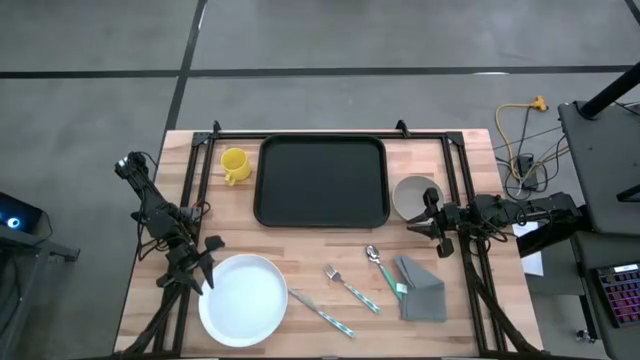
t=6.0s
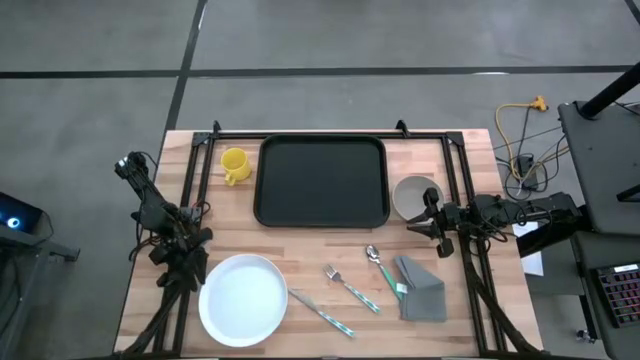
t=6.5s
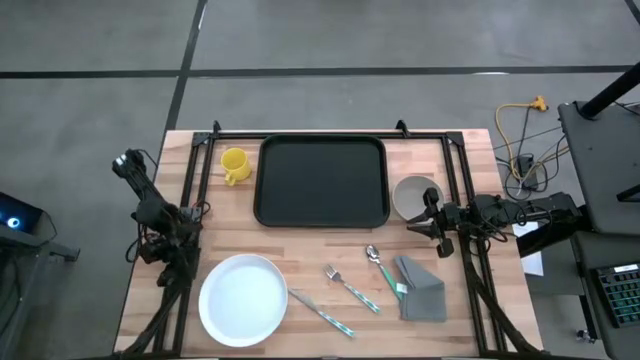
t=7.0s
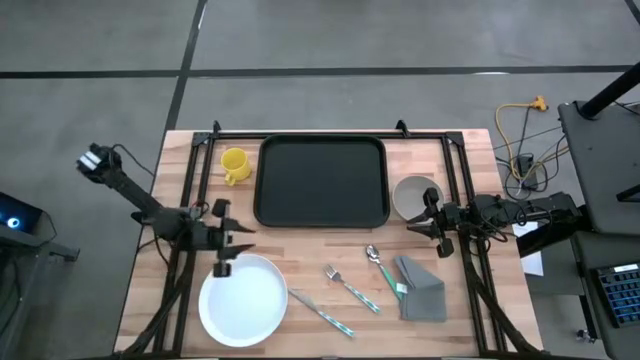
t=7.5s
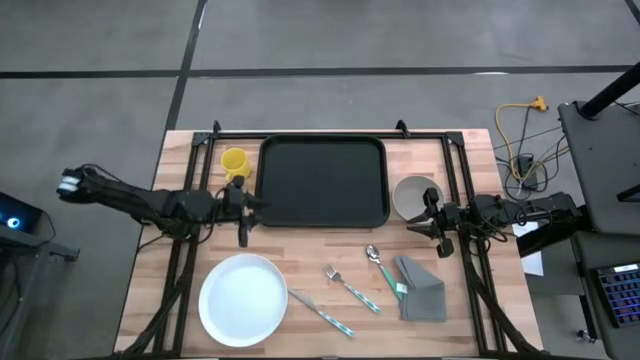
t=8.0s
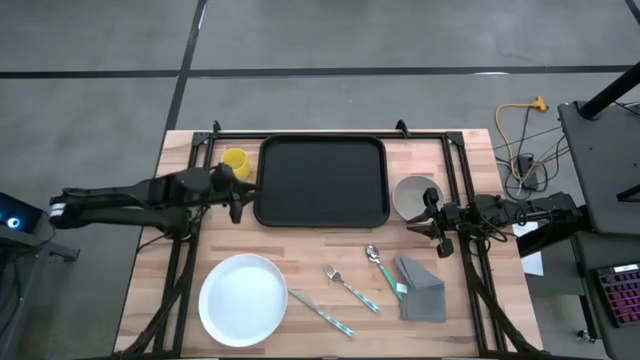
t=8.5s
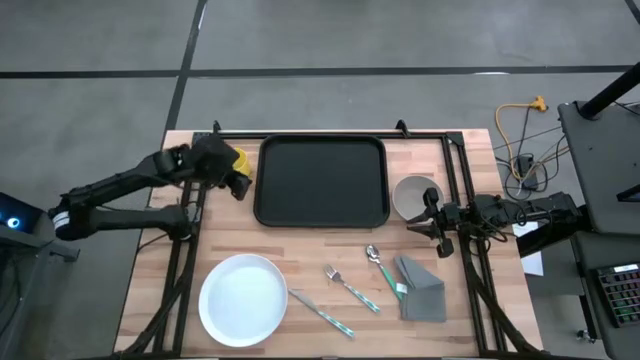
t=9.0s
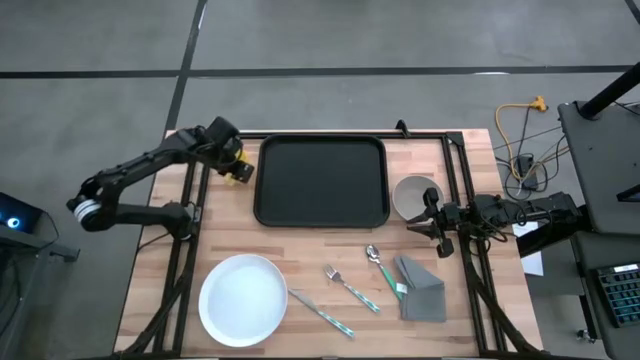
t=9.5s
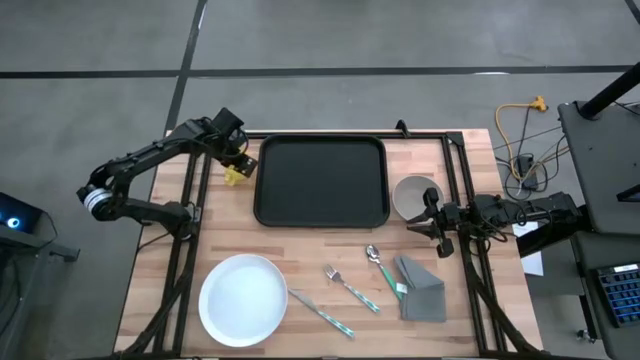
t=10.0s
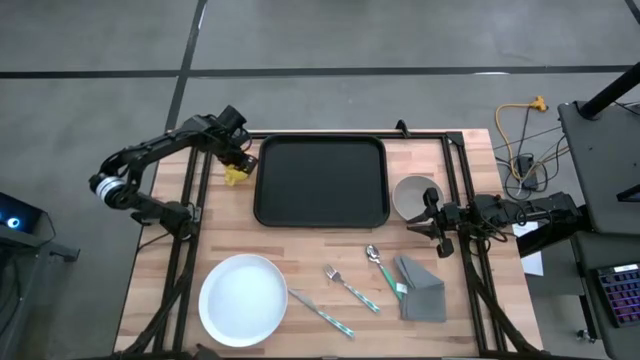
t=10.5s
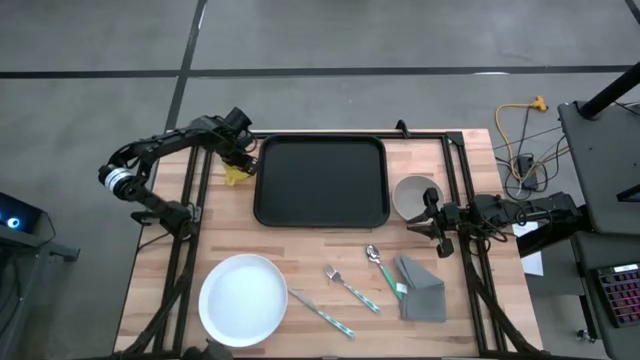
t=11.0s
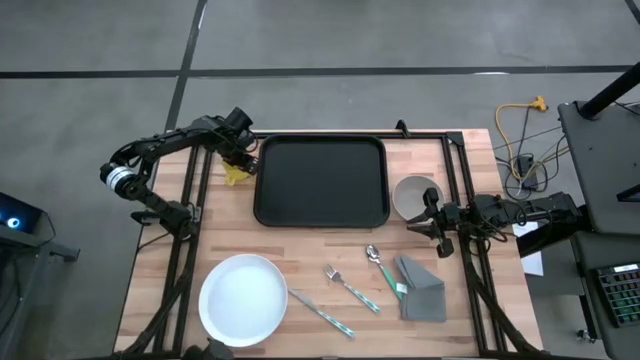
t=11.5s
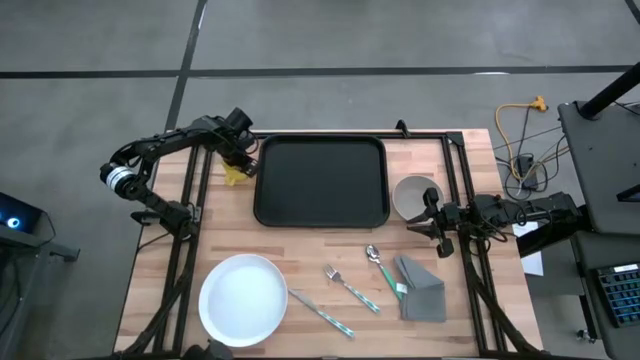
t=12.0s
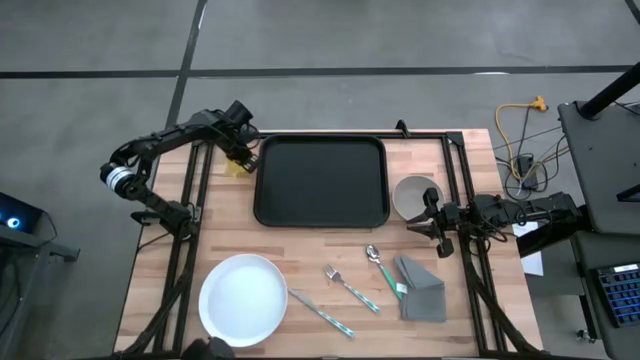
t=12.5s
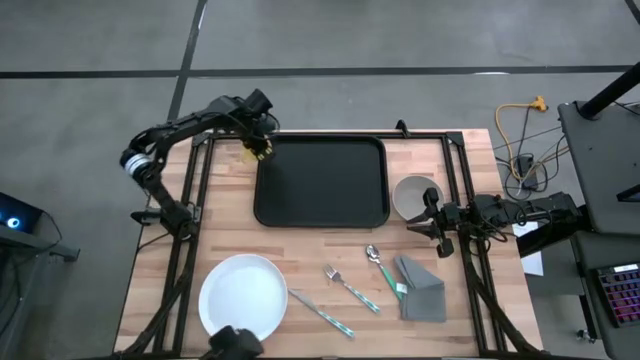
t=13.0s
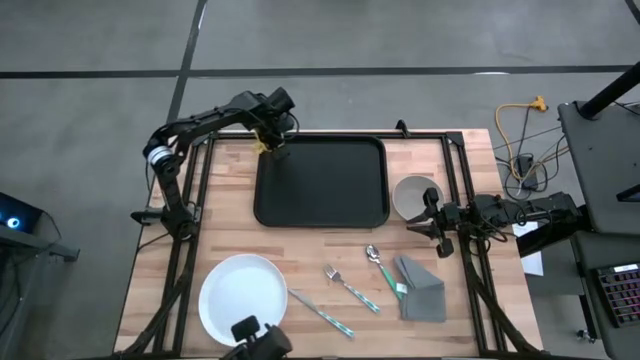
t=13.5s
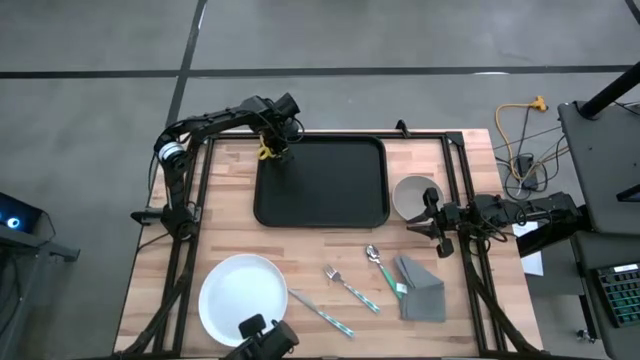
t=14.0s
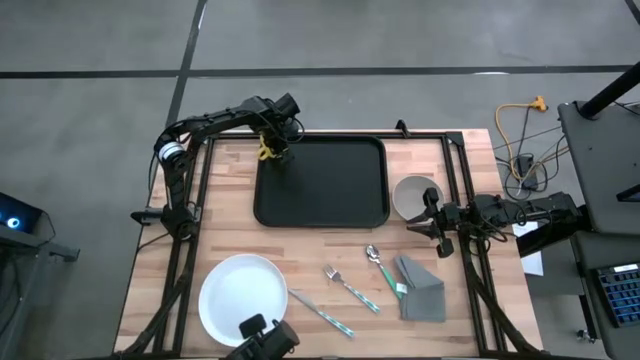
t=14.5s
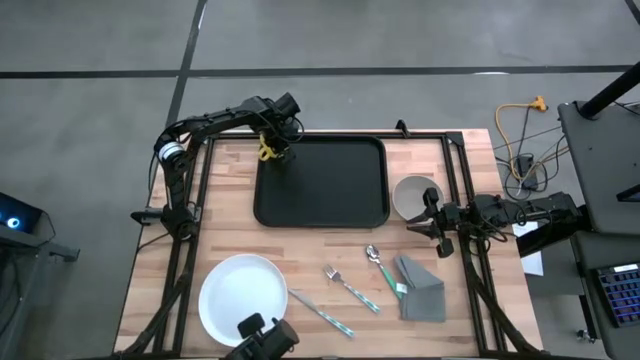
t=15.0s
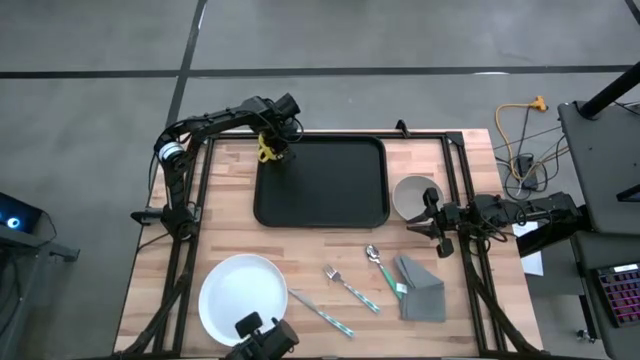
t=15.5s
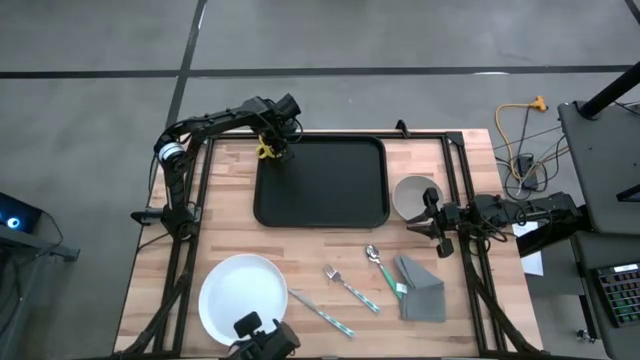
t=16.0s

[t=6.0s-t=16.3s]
Task: Set up tray
Put the yellow cup on the black serving tray

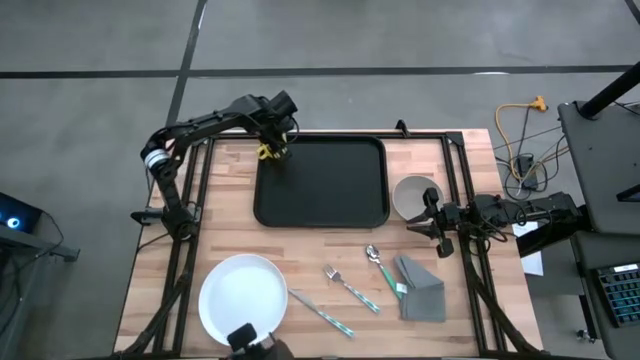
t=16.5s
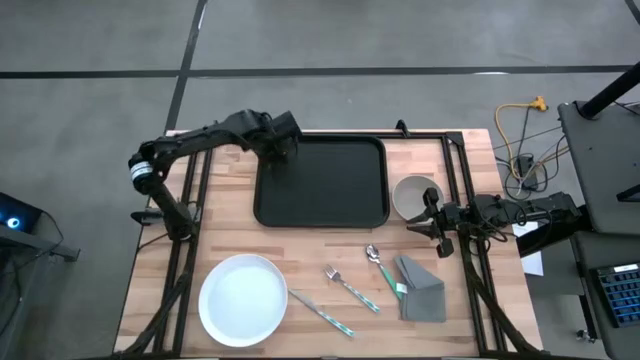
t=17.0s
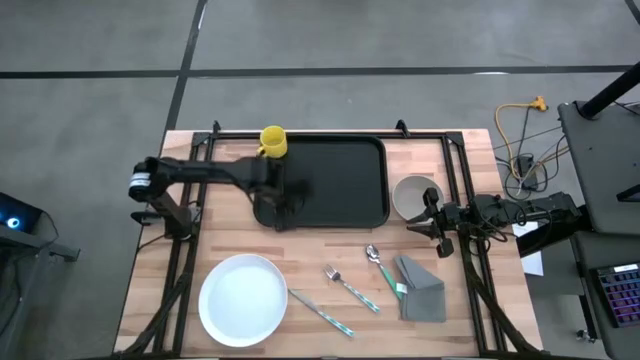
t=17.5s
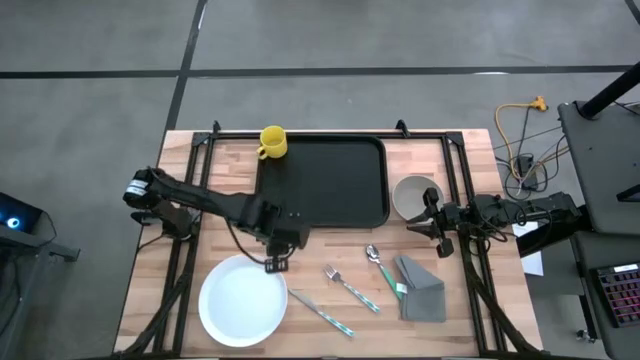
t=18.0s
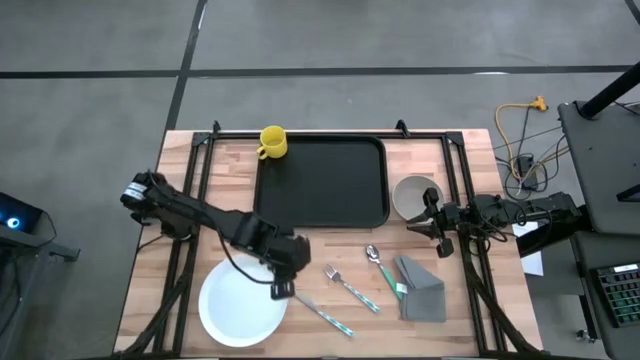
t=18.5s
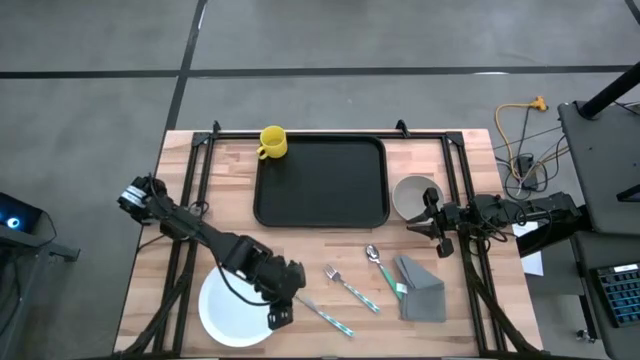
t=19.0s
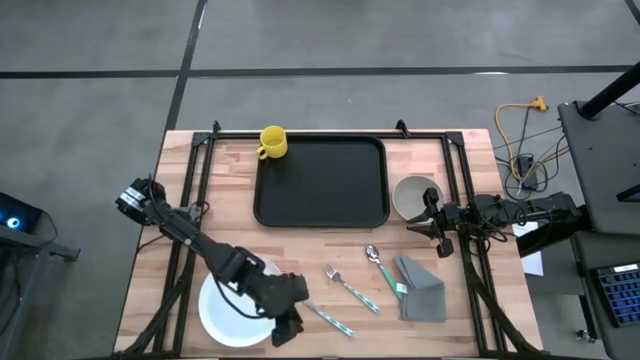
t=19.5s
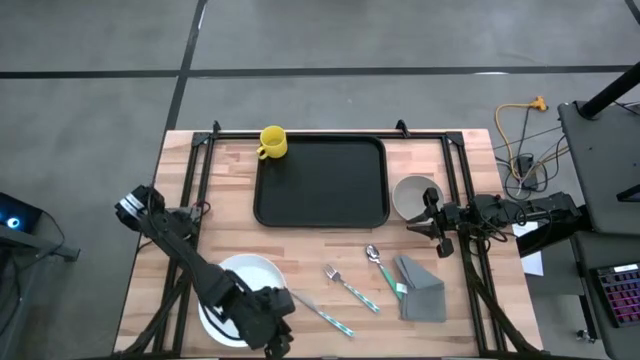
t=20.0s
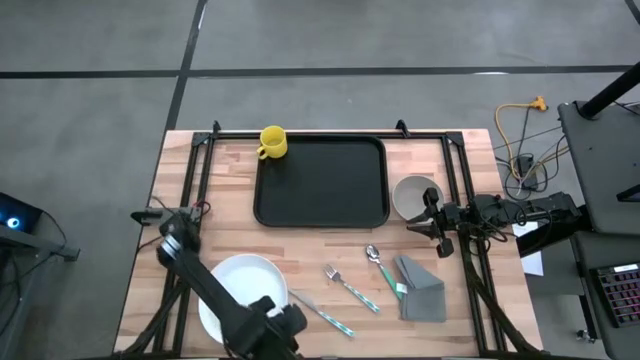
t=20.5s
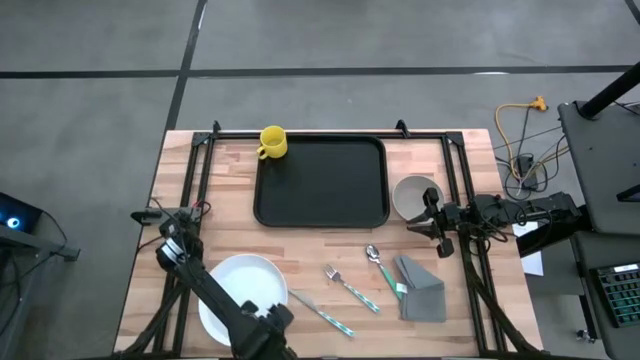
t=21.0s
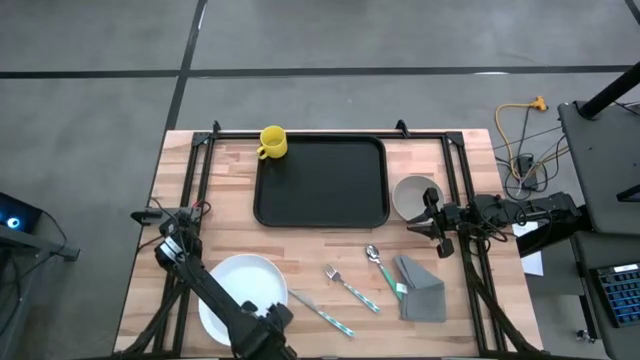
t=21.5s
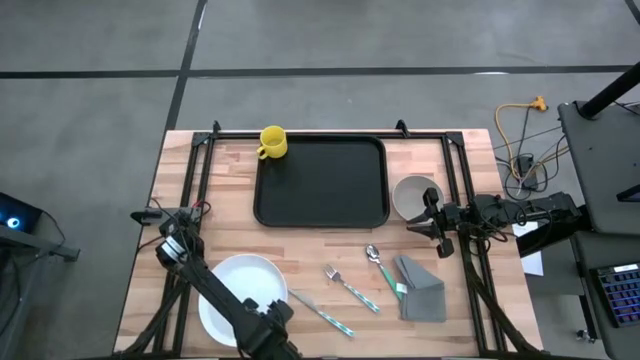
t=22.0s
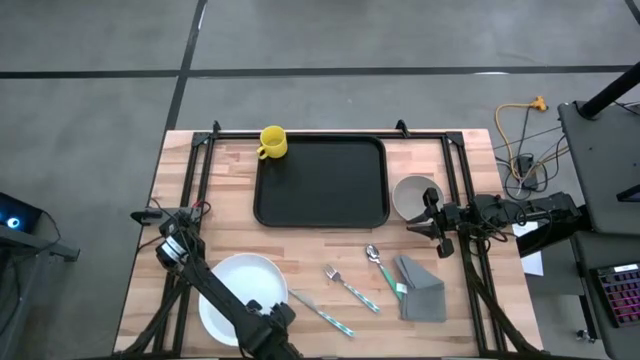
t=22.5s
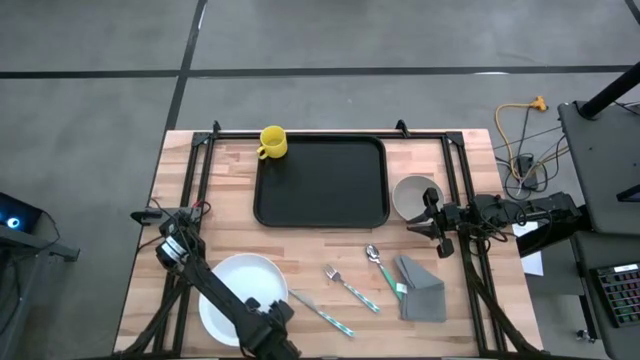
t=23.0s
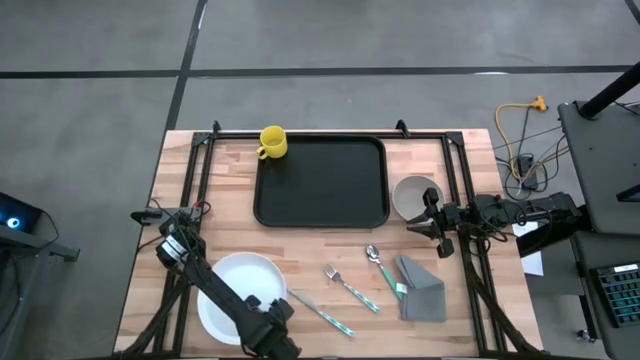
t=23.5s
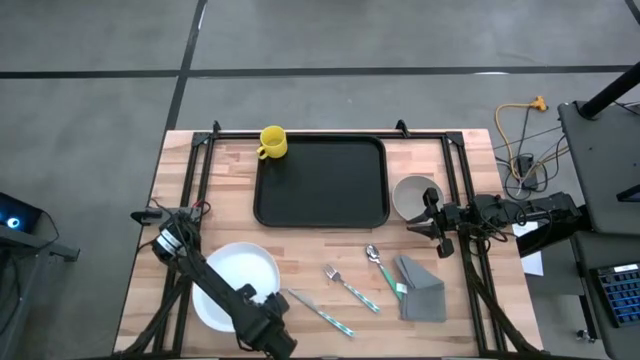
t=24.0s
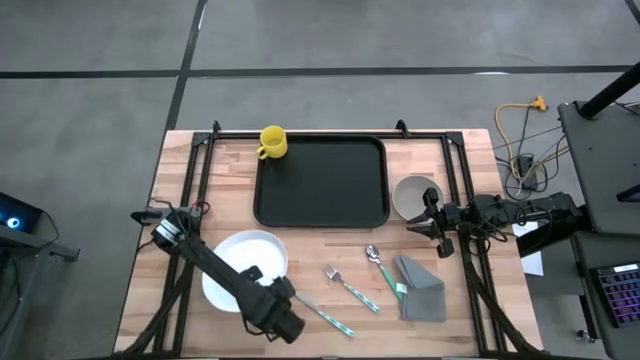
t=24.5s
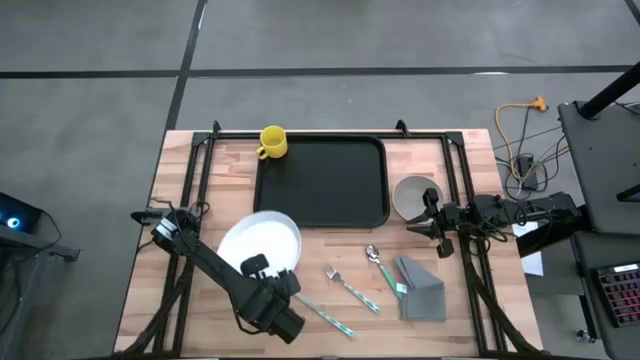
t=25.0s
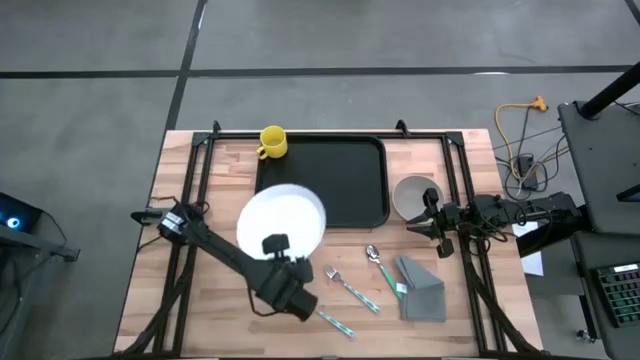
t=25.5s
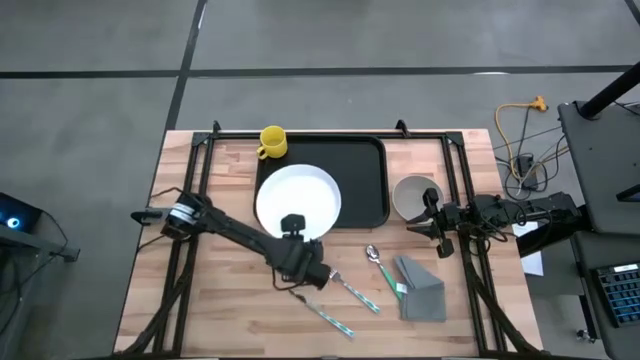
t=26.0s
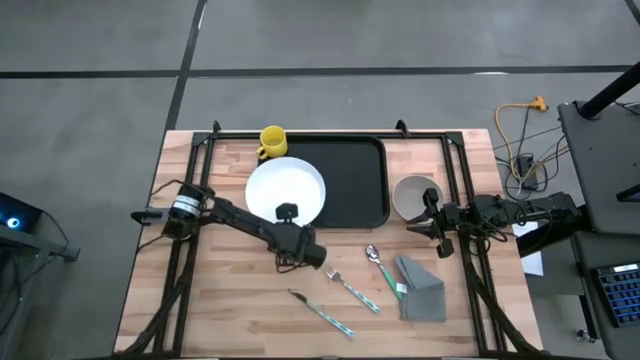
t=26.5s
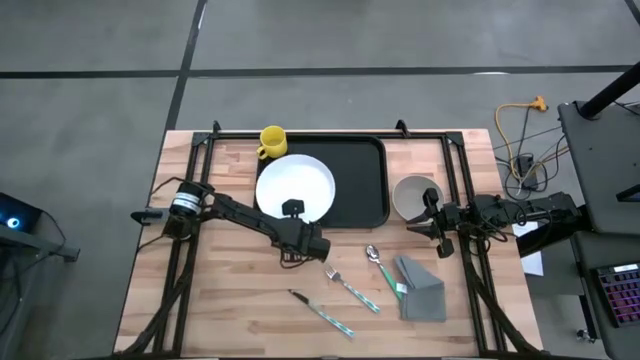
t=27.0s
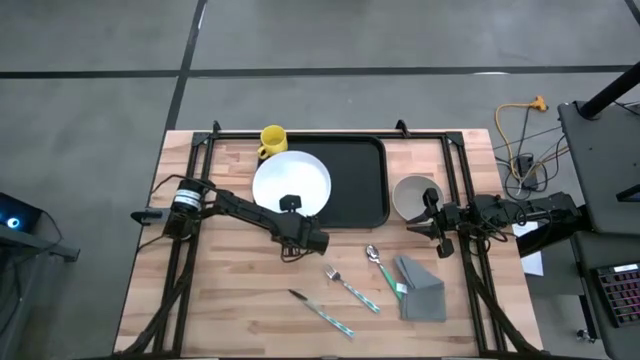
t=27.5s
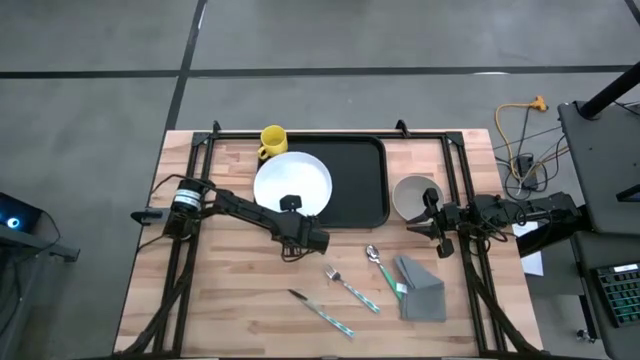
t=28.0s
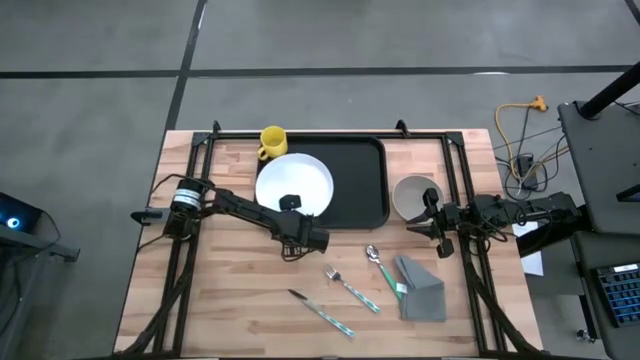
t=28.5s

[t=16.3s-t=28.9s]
Put the white plate on the black serving tray
